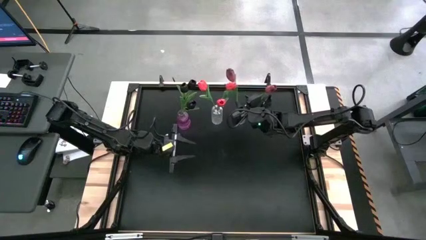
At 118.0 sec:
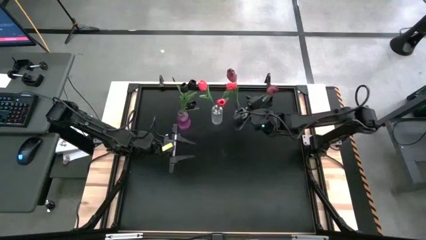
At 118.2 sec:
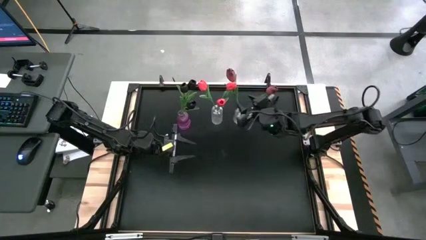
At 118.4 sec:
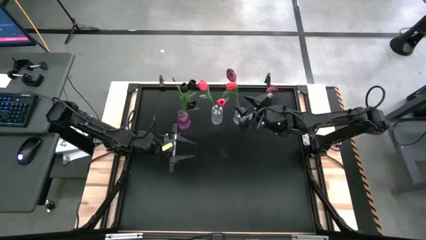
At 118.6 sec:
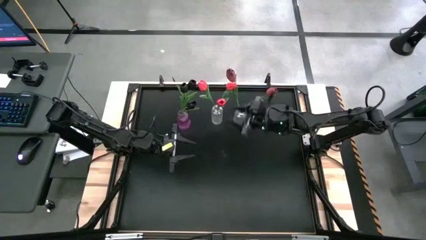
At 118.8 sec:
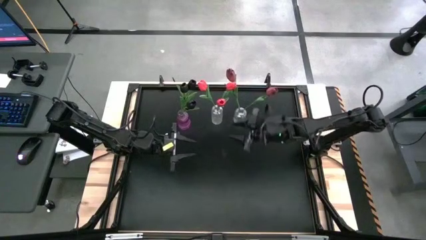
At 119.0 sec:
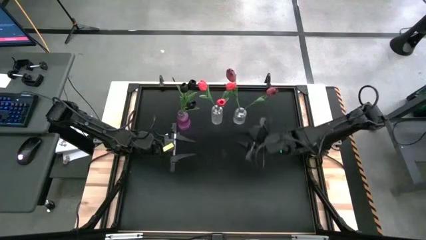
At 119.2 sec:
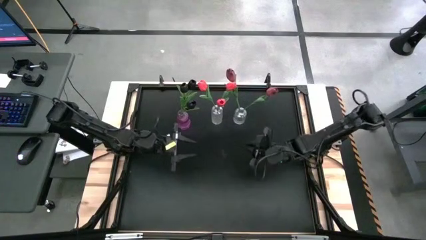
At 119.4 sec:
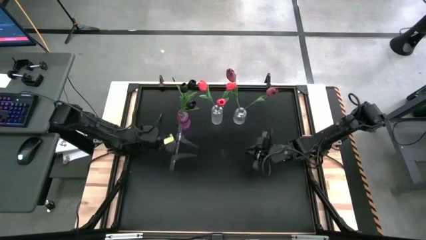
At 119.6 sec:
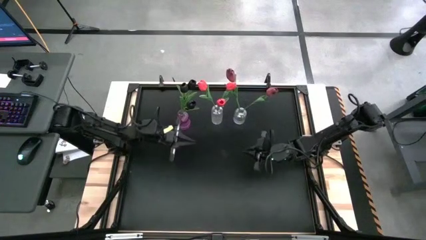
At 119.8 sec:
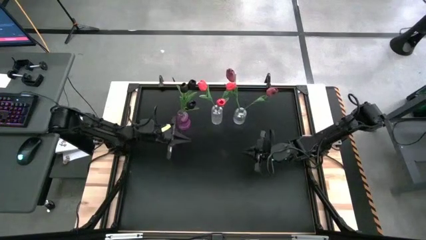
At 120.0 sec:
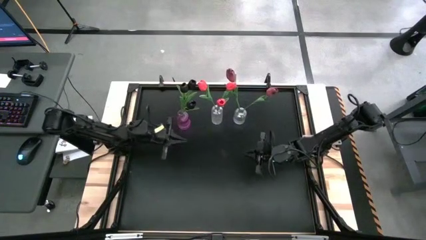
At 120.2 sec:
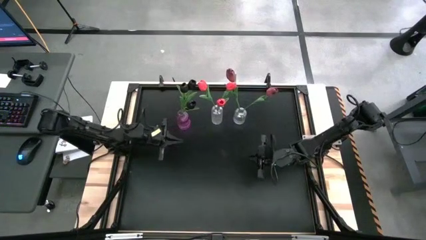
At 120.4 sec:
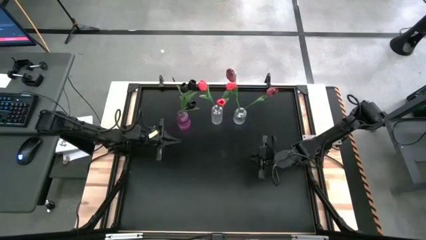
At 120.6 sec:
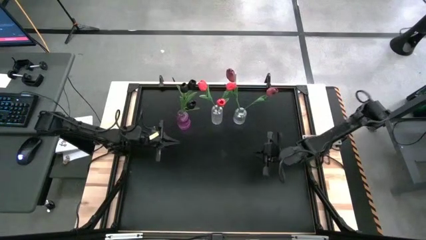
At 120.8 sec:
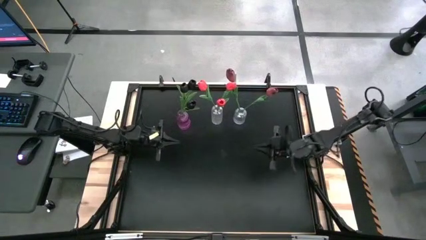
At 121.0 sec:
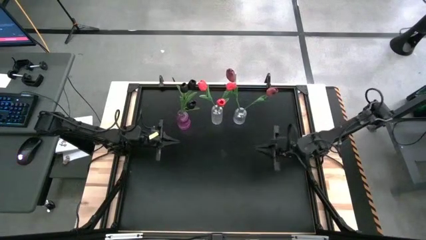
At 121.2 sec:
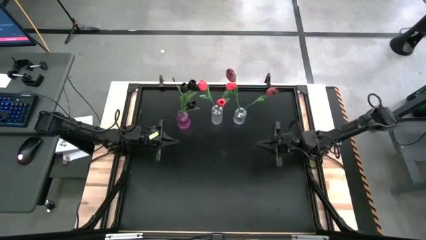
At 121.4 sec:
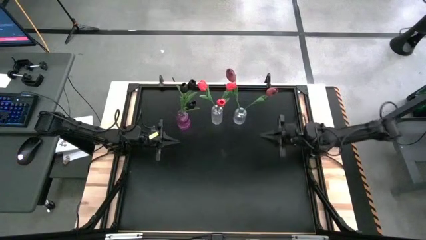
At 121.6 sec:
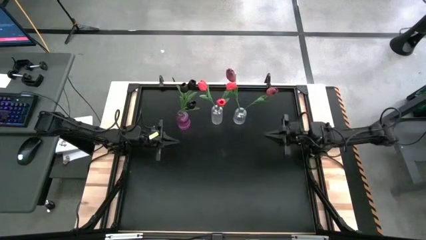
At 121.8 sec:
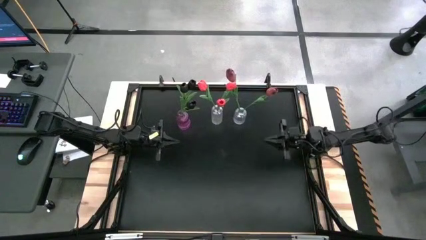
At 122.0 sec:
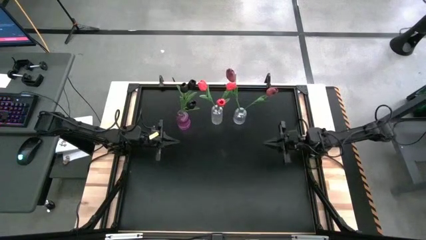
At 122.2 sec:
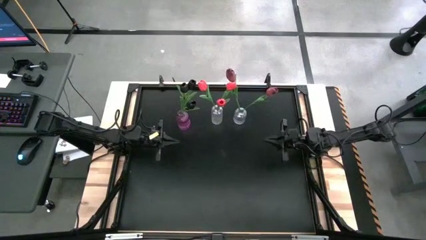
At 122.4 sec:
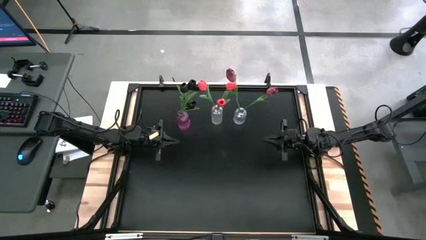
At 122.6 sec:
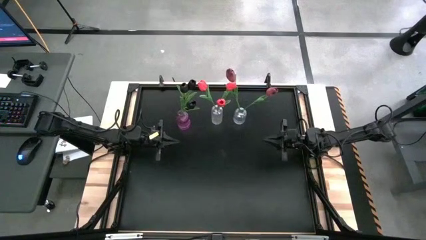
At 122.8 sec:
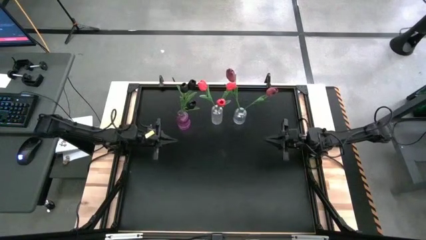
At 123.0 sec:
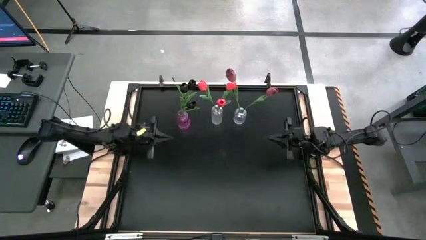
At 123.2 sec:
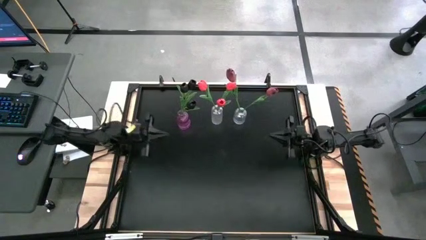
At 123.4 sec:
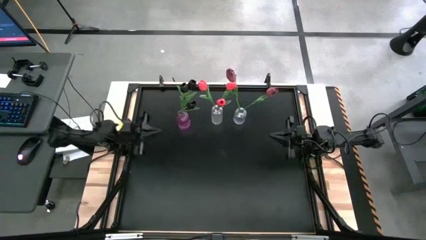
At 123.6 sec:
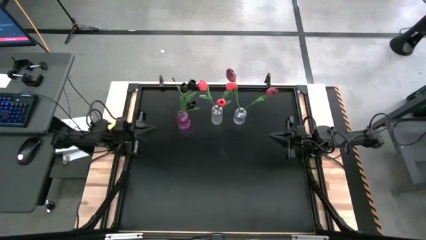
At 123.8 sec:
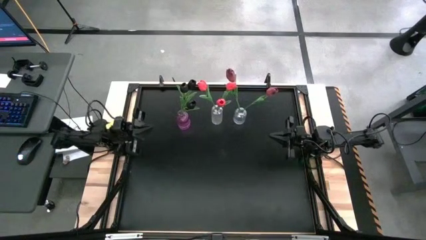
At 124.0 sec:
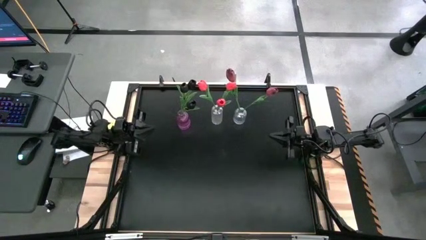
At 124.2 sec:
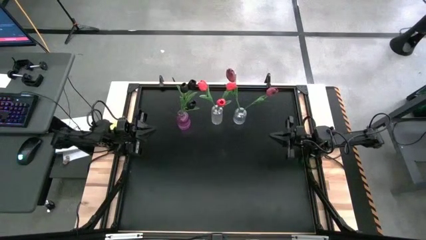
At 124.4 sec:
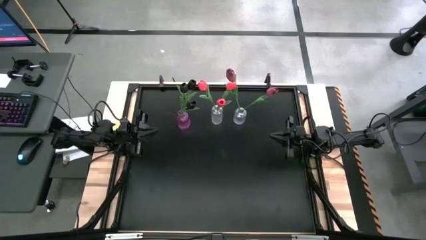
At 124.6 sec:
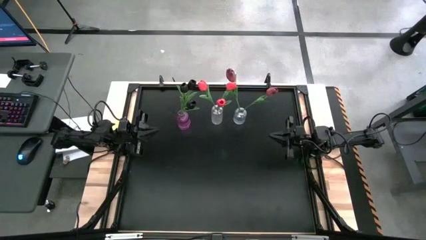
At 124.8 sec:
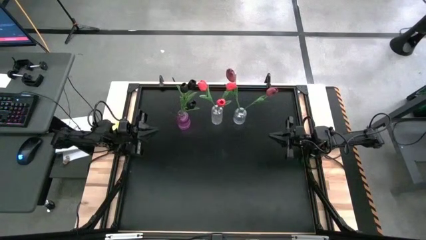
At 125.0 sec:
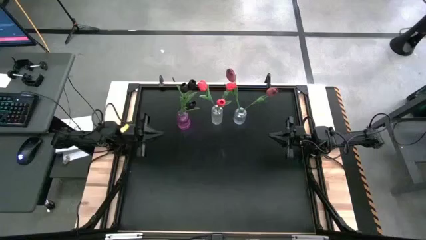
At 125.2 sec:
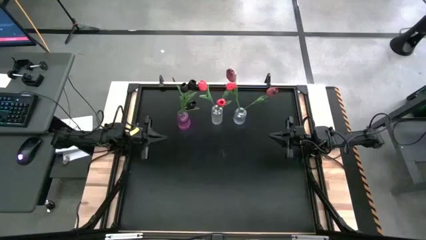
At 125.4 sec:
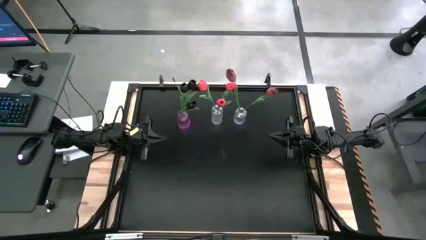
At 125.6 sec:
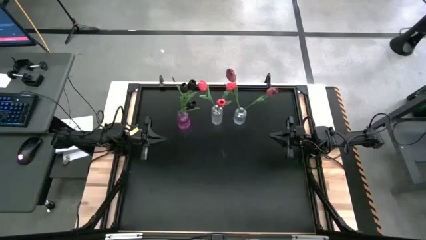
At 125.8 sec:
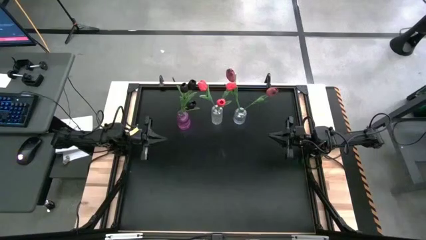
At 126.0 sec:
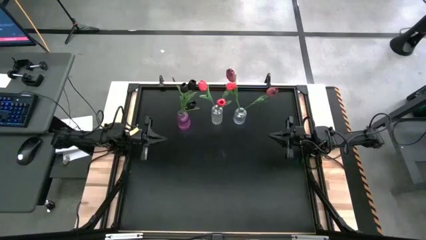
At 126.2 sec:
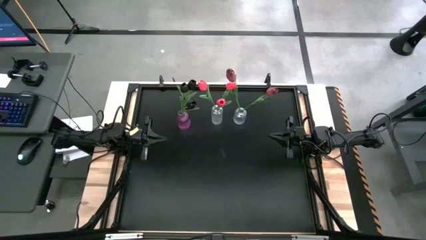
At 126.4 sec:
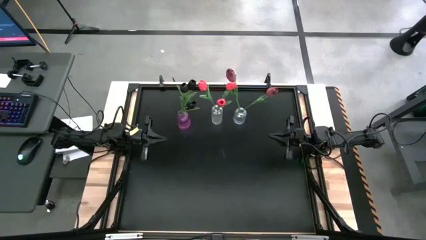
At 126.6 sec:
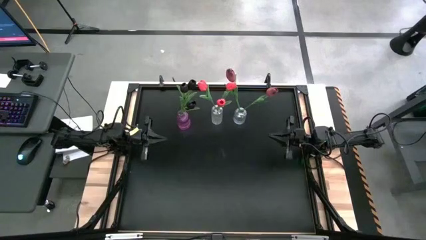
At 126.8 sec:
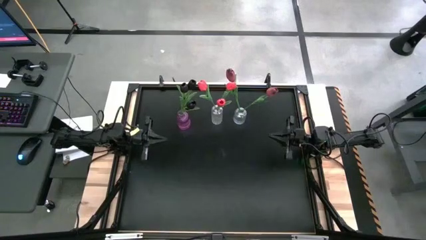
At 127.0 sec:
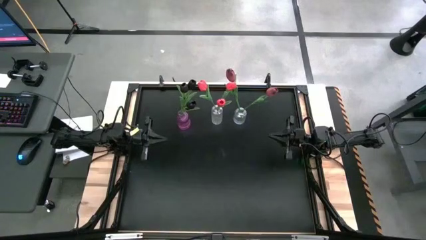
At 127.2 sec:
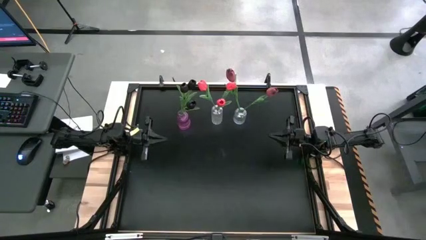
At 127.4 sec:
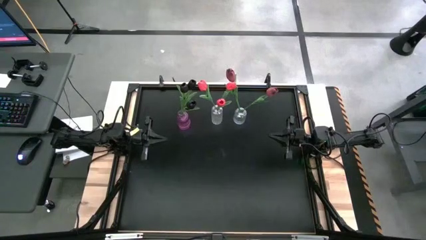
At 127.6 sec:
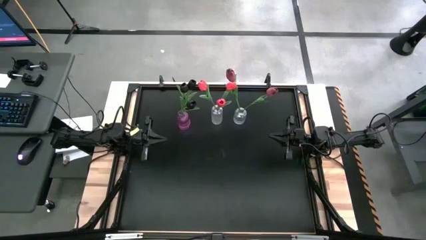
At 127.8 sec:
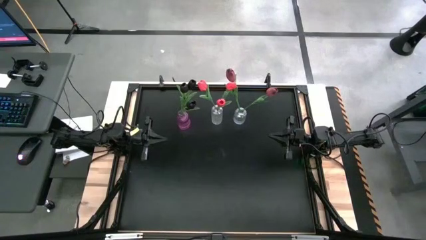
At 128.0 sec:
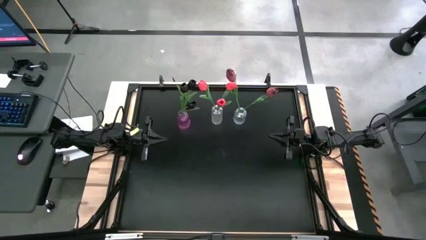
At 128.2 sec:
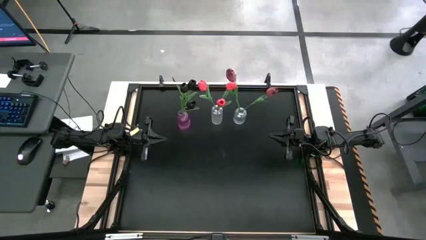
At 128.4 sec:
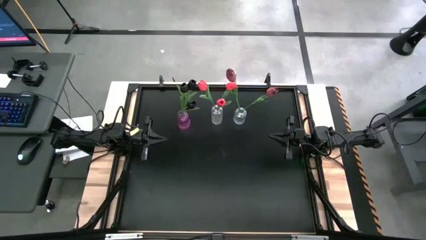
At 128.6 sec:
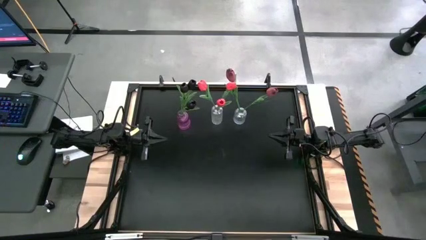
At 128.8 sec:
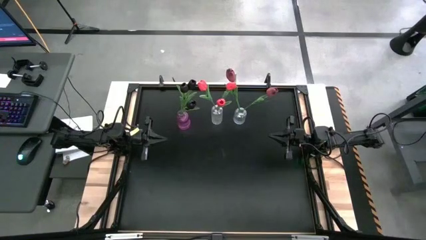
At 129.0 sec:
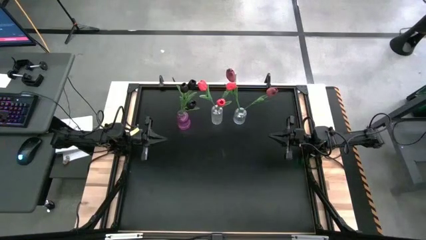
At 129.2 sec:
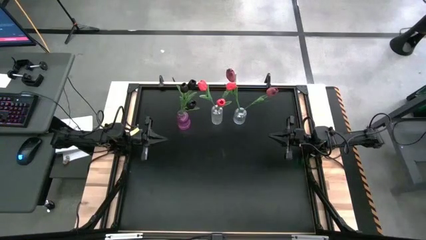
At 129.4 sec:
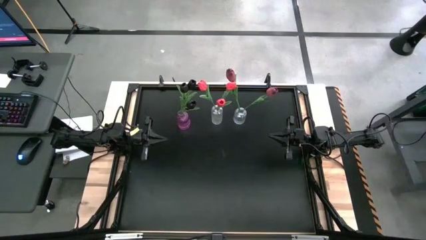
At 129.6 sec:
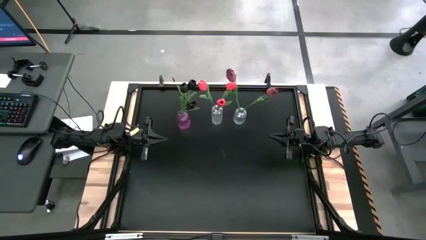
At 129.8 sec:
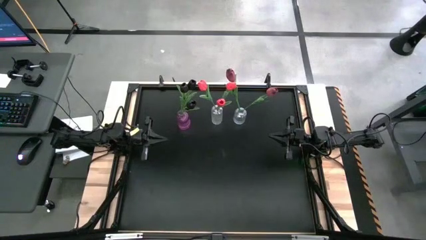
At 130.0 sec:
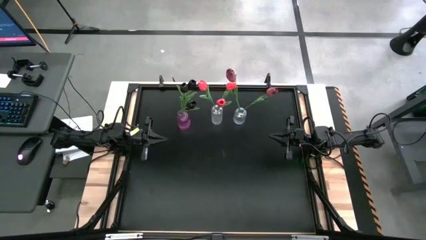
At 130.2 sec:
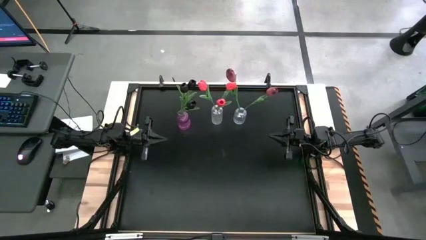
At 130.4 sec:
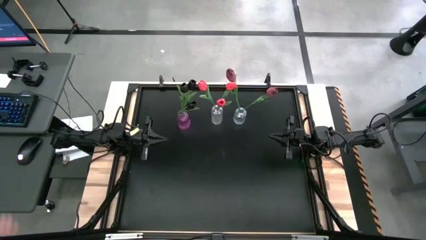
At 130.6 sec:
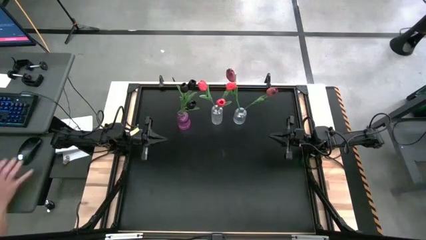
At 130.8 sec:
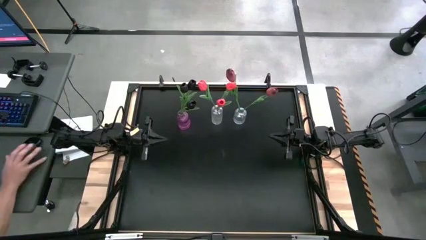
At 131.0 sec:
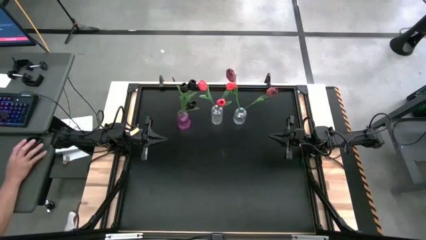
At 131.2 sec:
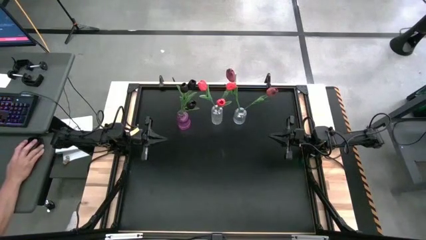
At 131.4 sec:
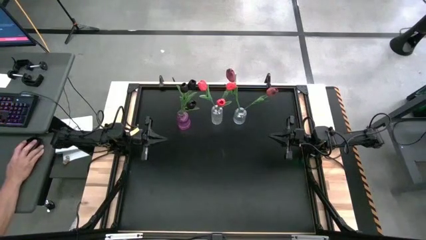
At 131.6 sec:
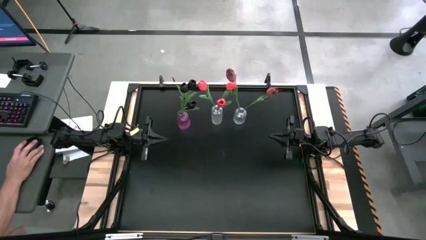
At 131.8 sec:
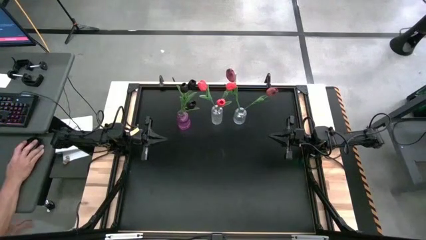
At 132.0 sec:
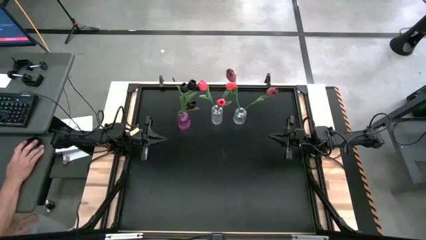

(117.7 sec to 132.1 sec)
Task: Sort flowers into vase by color
Return to Home Position
